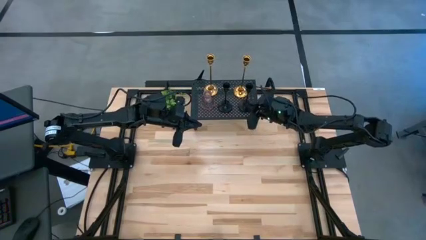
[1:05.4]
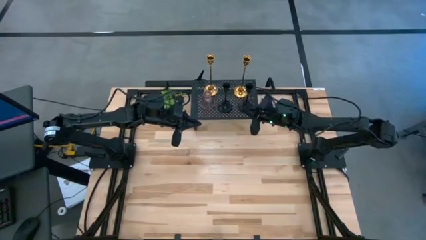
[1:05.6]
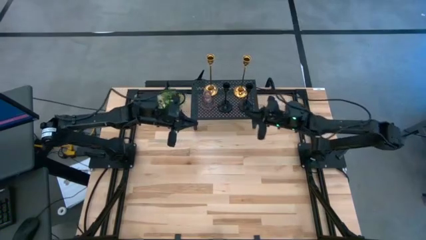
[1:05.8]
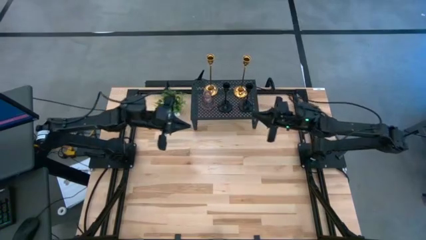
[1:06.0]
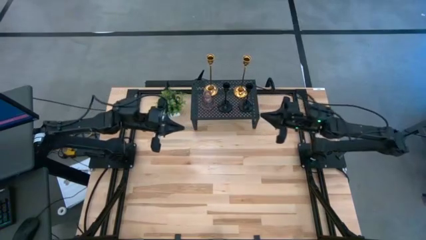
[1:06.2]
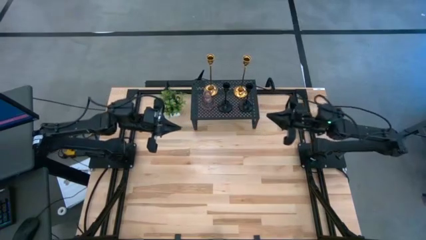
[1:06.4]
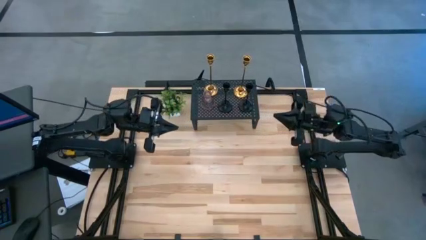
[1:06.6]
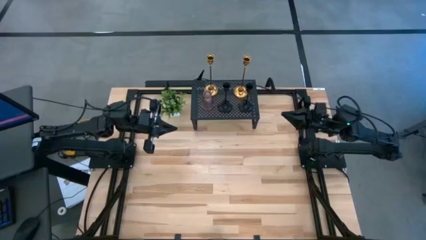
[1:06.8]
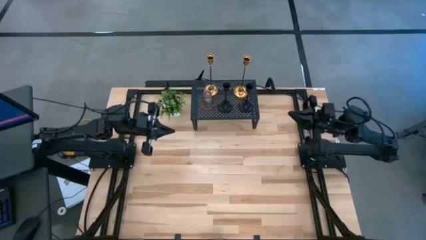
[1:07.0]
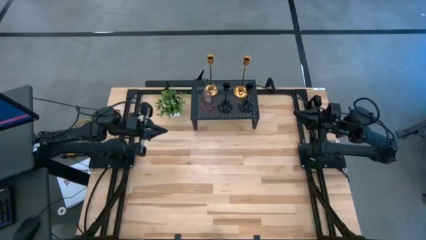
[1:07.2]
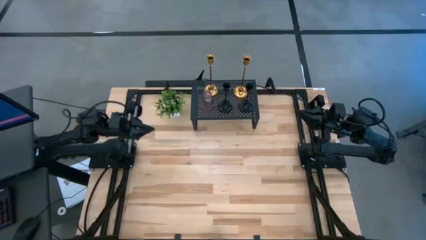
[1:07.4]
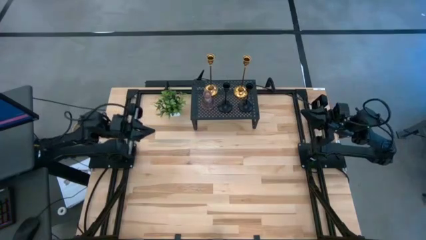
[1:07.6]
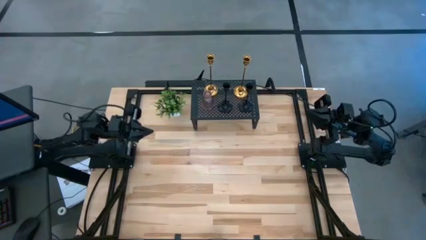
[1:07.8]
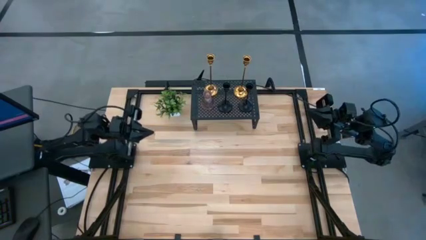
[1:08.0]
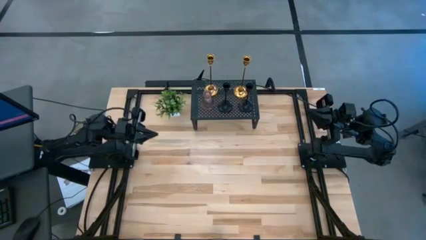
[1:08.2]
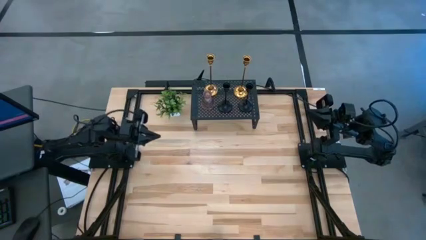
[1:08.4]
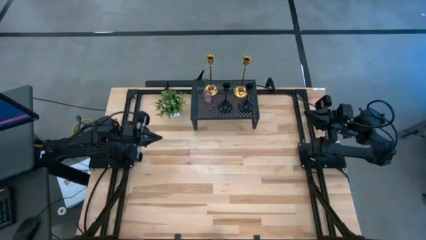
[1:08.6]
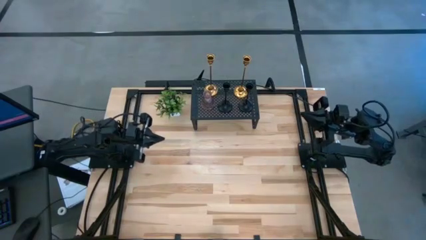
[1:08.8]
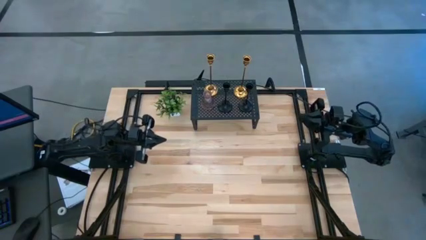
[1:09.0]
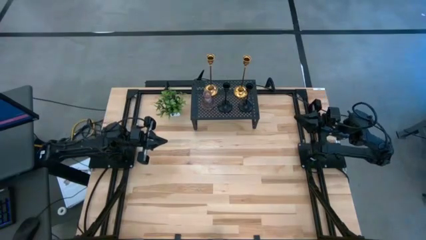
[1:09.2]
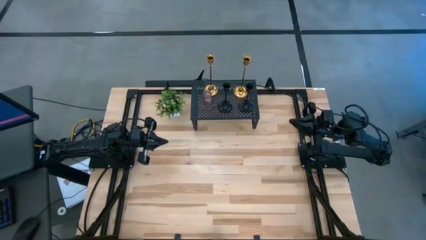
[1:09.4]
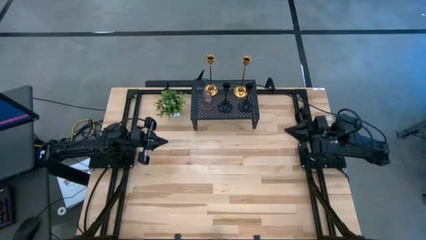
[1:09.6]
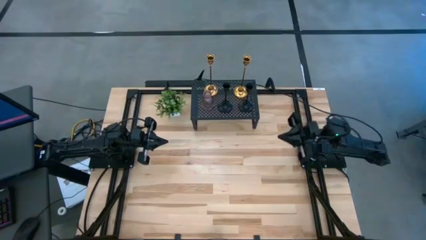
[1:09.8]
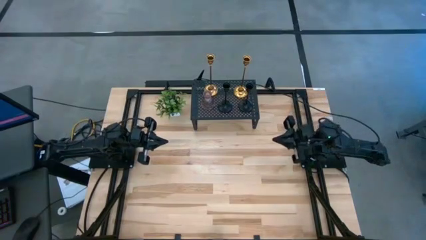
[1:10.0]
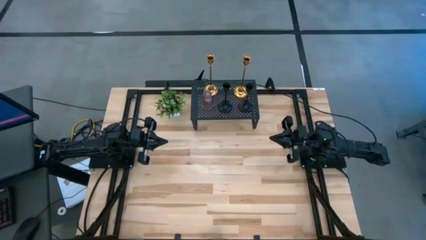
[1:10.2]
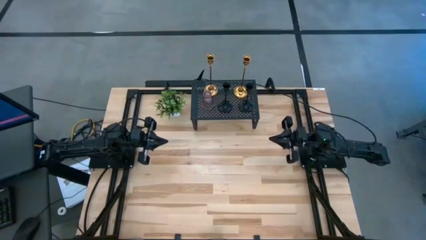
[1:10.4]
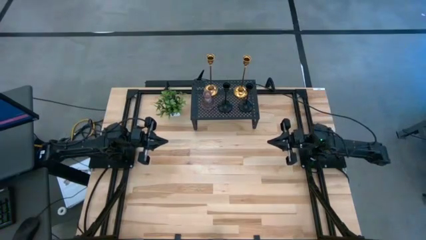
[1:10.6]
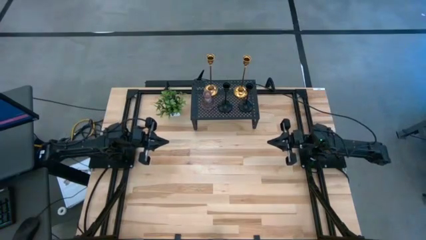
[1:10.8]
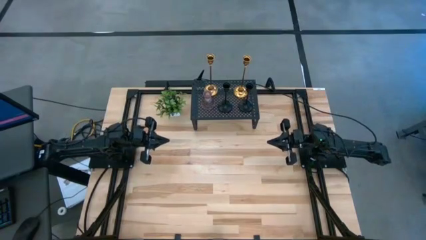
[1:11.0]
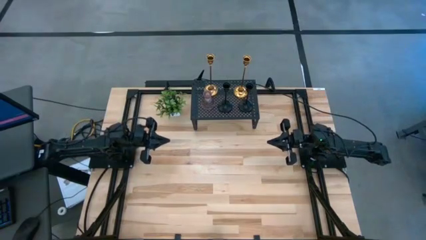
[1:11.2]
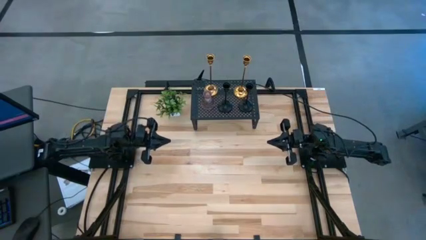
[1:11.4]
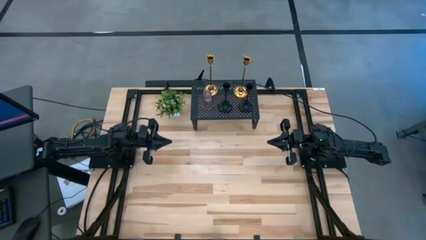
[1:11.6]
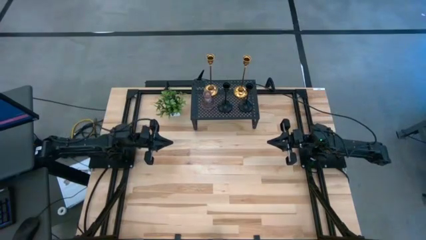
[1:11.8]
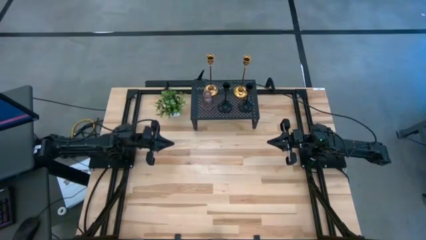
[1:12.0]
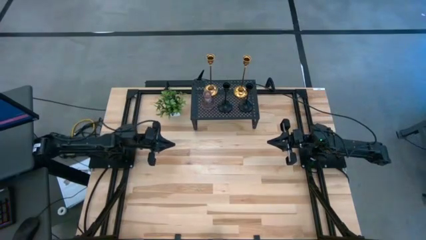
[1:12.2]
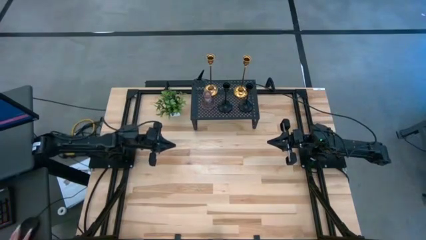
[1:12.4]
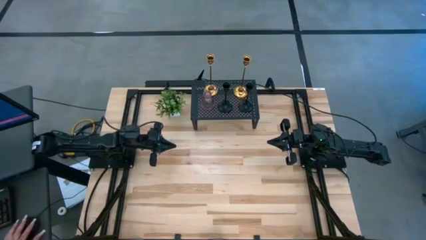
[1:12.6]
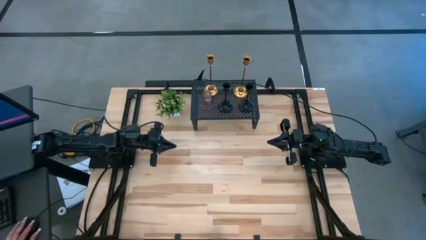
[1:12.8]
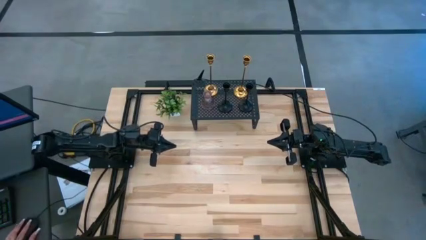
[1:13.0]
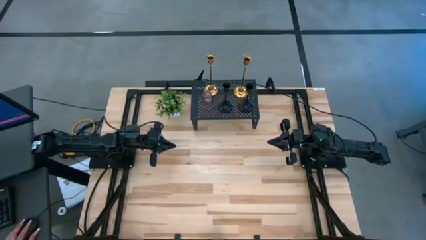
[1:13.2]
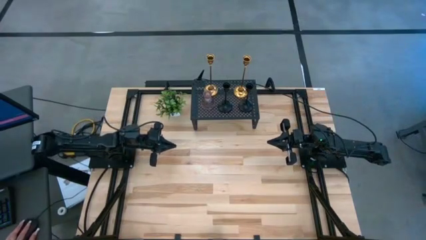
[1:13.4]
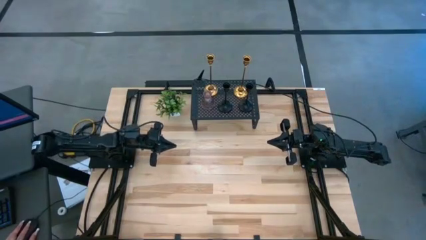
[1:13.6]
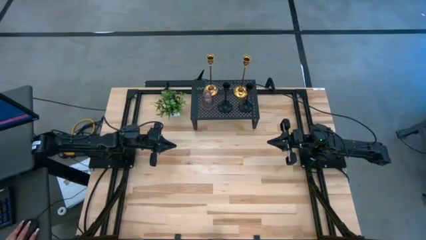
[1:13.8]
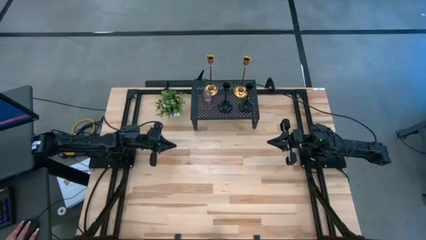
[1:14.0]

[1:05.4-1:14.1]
Task: Pick & Place candle stick holders
Return to Home Position

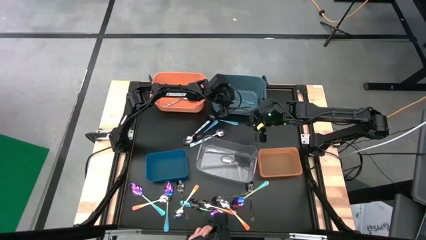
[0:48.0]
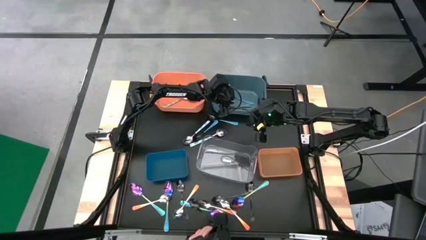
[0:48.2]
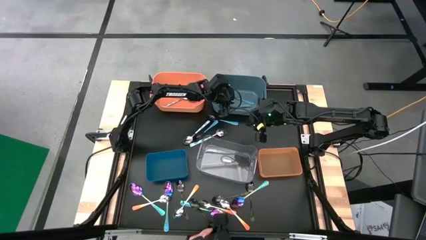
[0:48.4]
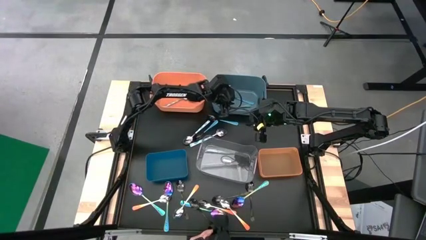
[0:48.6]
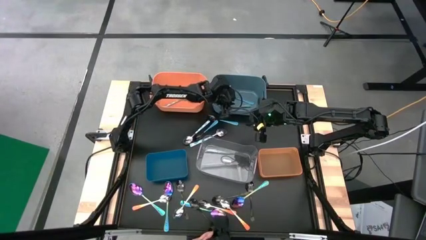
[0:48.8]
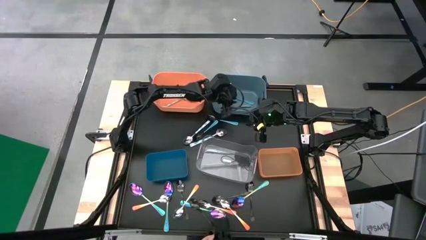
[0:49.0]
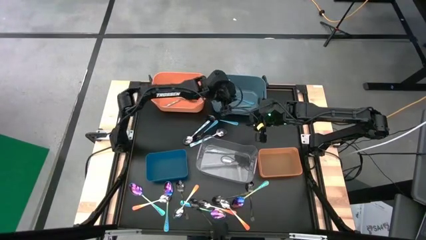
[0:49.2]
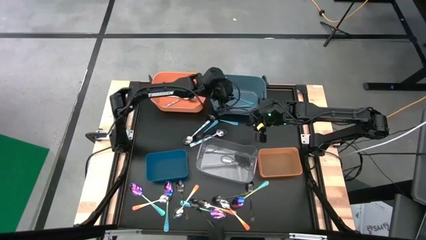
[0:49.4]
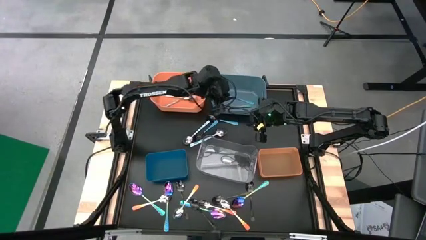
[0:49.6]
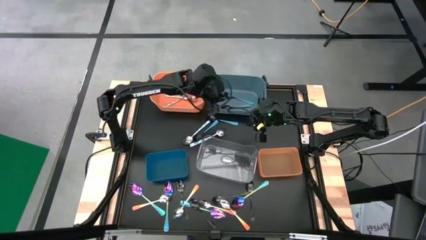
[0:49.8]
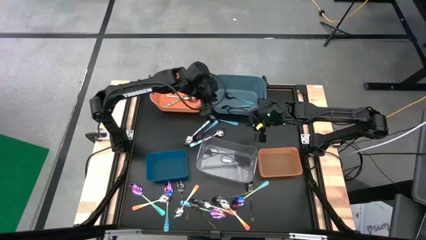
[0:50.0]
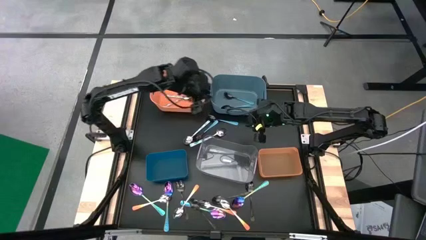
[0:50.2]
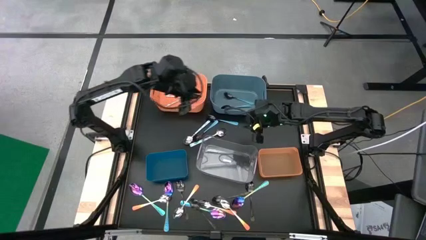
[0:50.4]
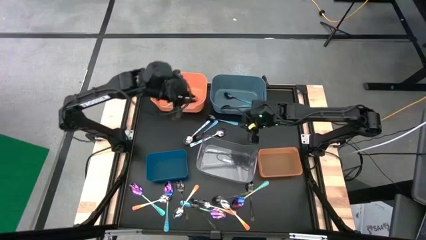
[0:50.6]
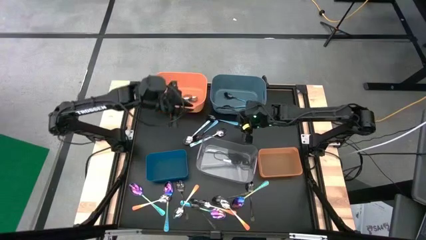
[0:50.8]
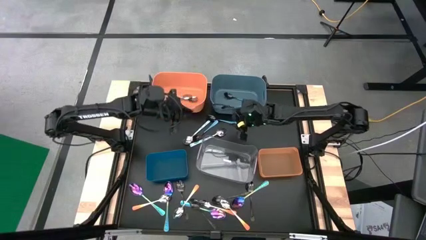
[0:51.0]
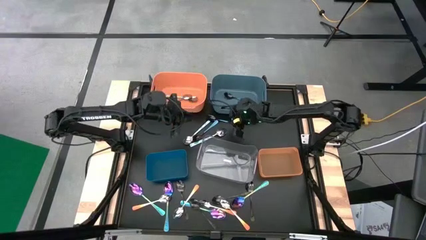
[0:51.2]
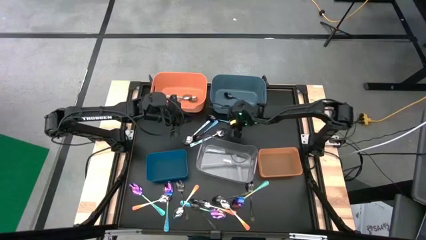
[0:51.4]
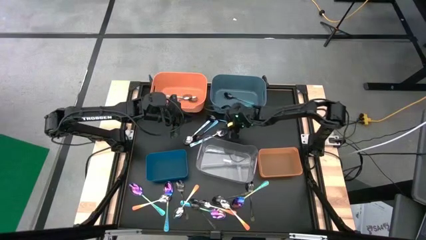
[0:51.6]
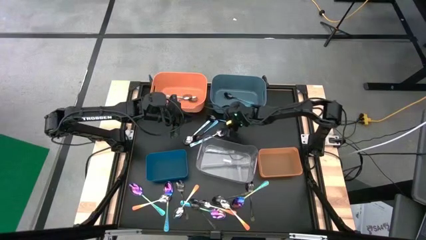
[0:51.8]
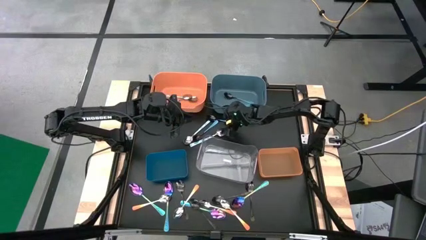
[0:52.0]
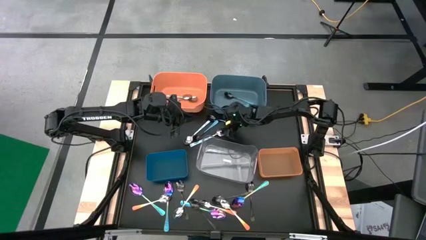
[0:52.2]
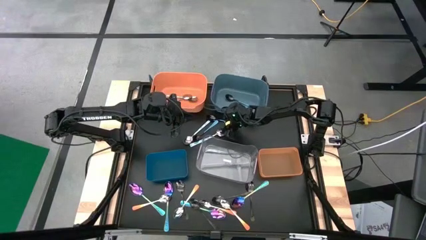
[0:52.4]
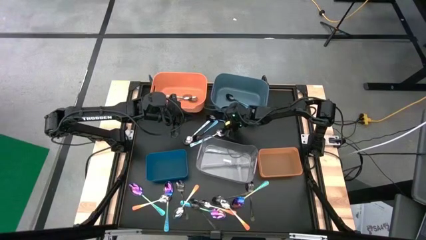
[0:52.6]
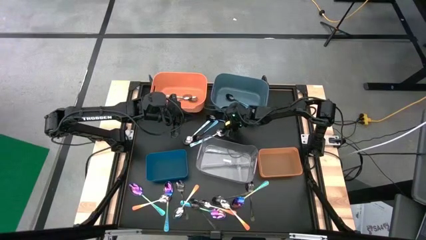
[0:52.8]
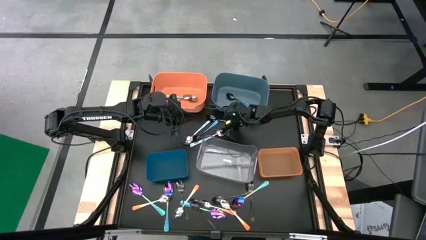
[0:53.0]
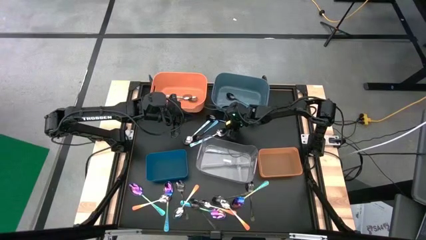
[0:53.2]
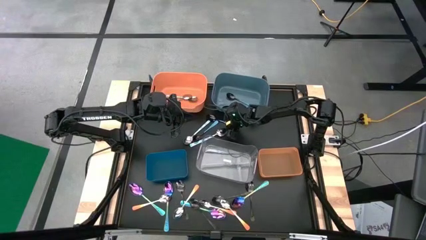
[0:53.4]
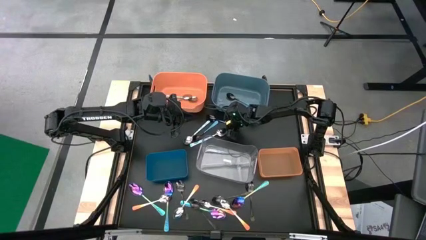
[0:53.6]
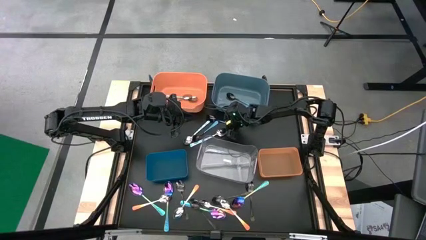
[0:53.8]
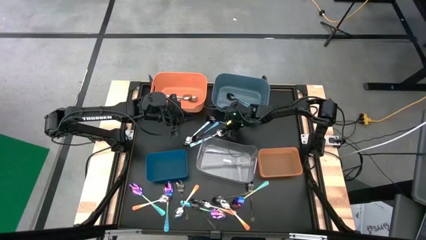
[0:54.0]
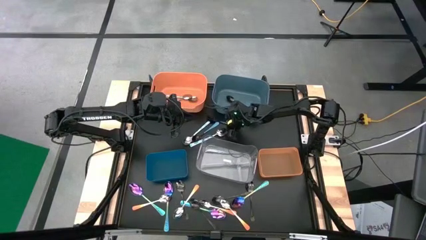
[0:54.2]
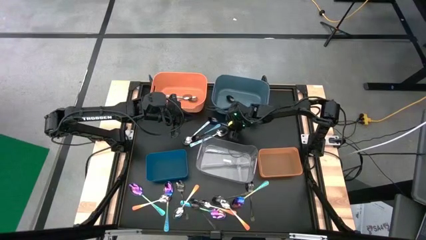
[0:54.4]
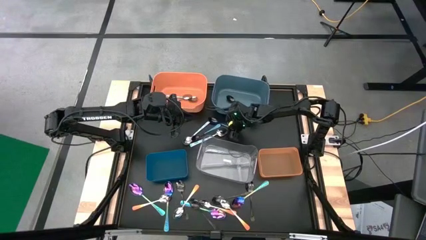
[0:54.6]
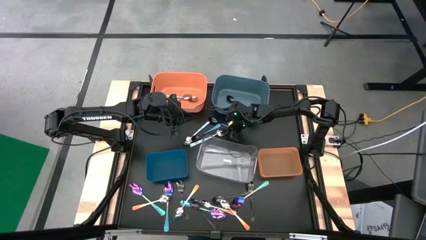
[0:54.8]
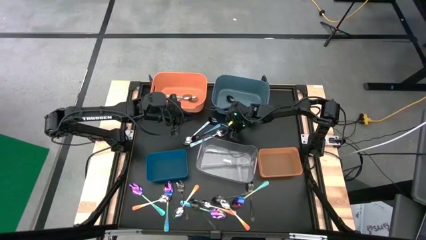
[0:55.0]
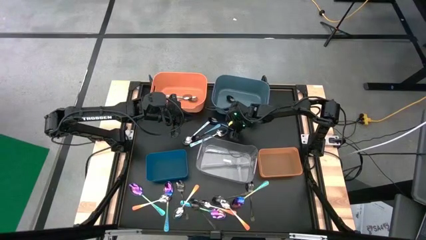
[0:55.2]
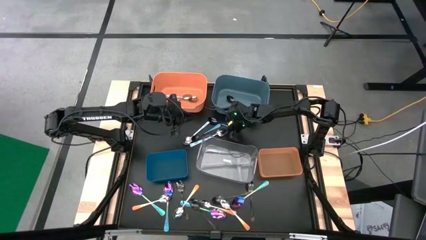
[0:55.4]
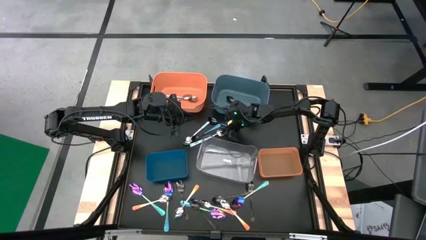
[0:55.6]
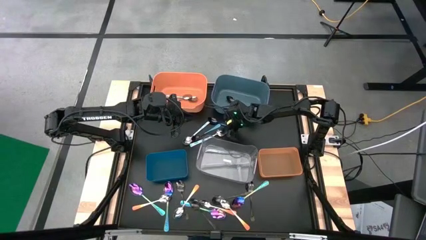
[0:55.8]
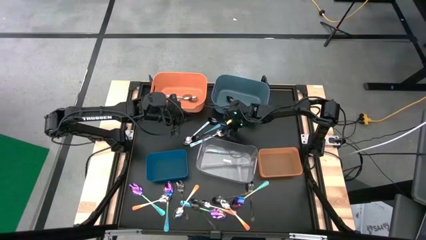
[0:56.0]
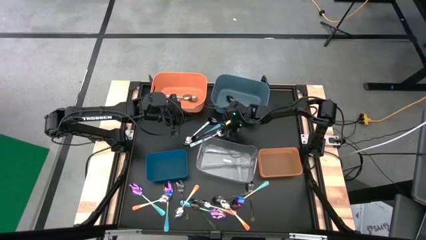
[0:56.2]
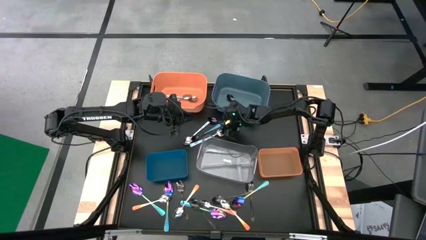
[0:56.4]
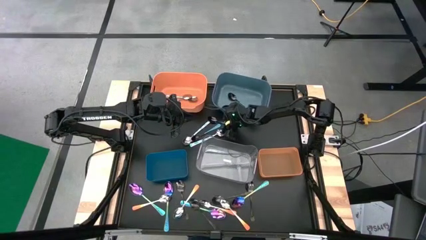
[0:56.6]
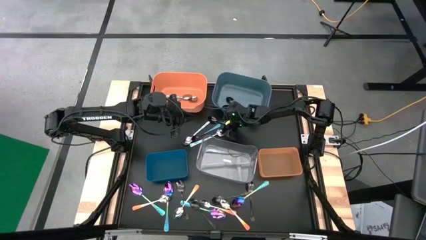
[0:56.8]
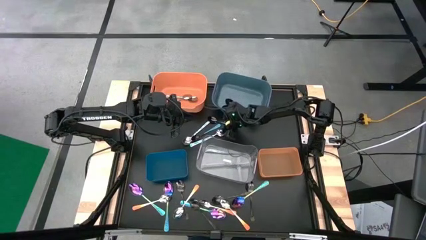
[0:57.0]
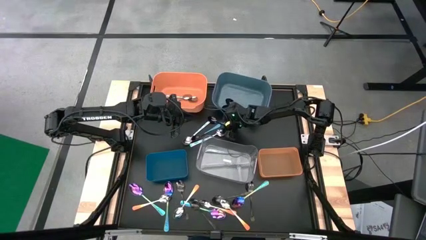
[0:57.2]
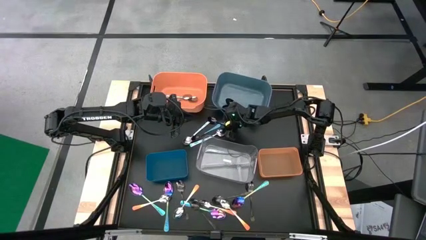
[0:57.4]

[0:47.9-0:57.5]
Task: Sort silverware by color (type)
Put the blue spoon into the light blue bin
